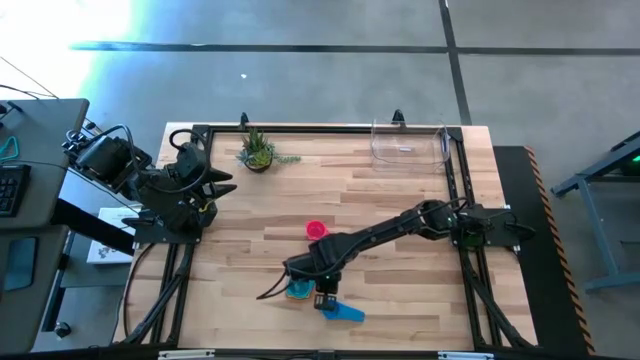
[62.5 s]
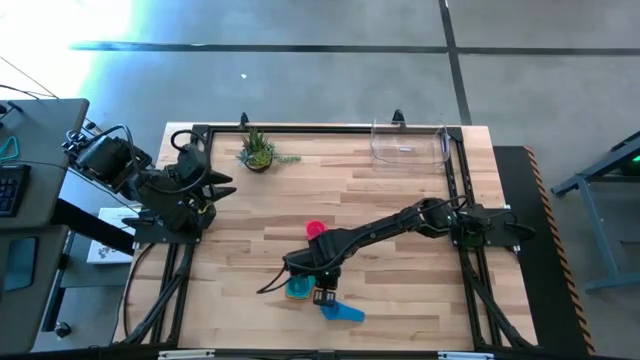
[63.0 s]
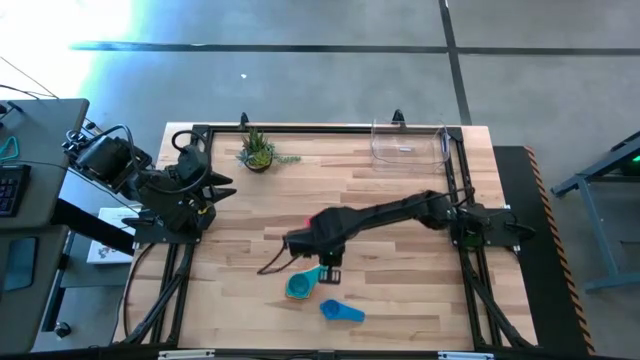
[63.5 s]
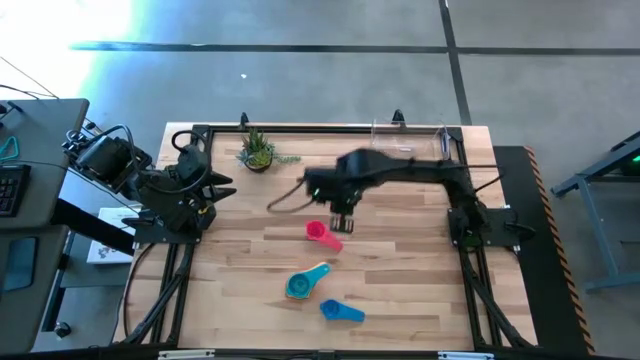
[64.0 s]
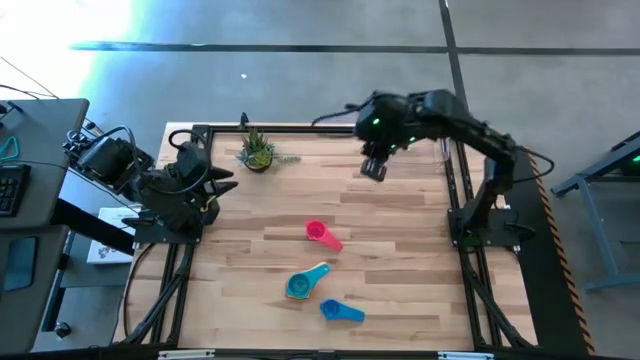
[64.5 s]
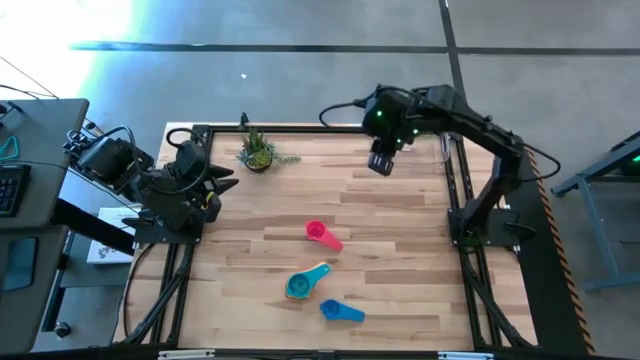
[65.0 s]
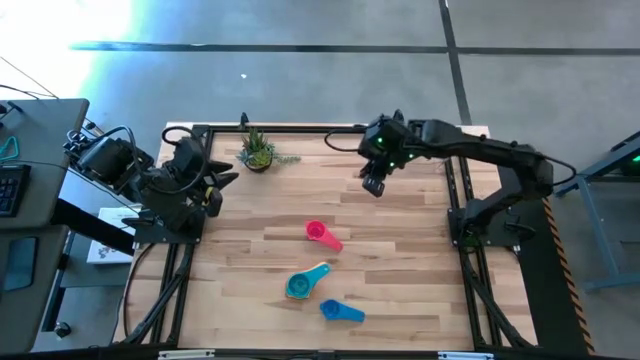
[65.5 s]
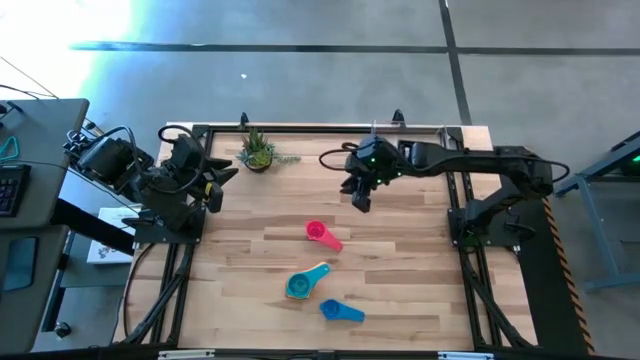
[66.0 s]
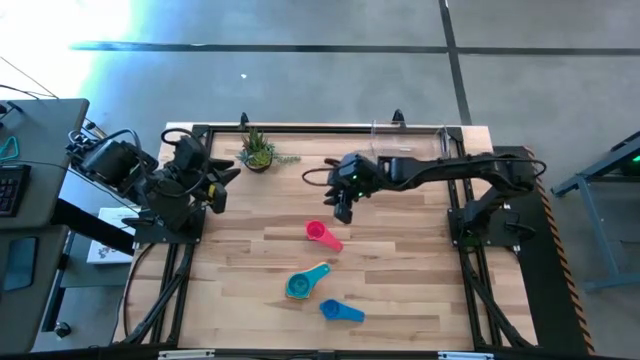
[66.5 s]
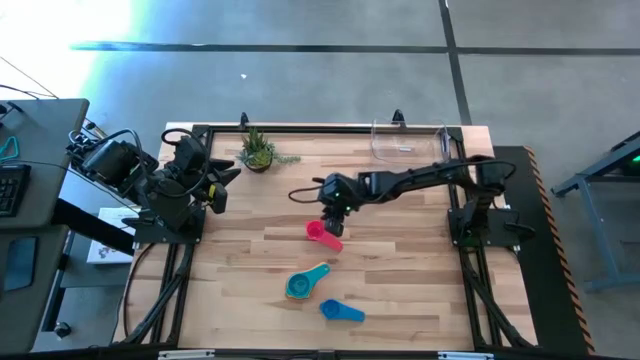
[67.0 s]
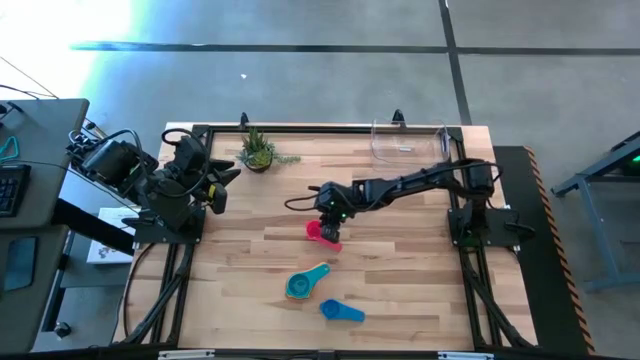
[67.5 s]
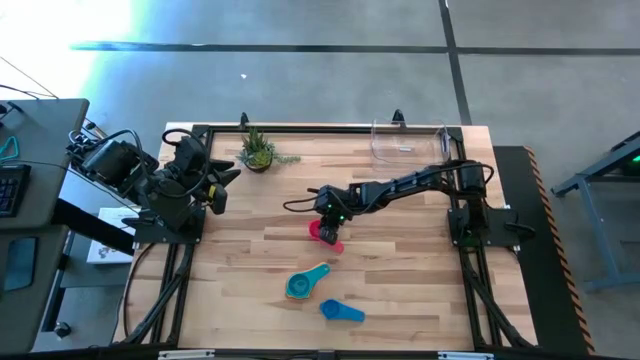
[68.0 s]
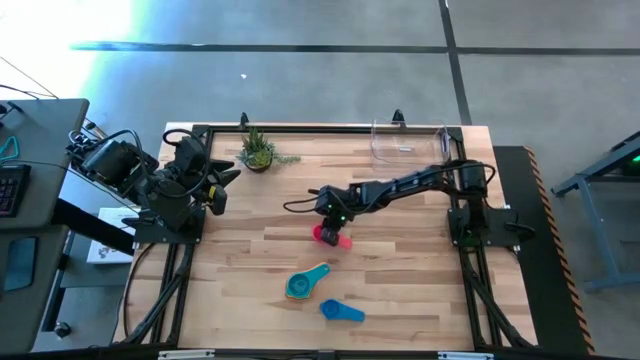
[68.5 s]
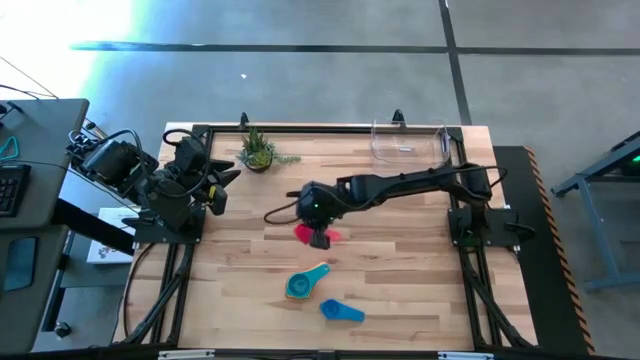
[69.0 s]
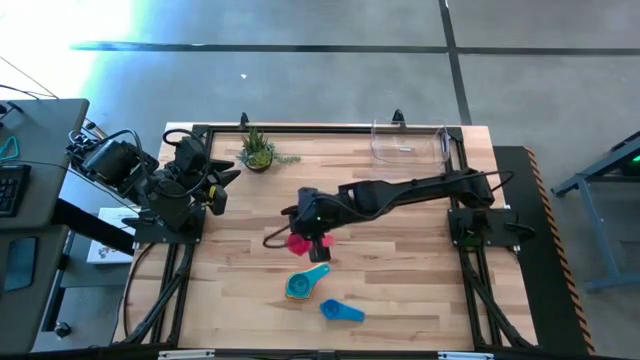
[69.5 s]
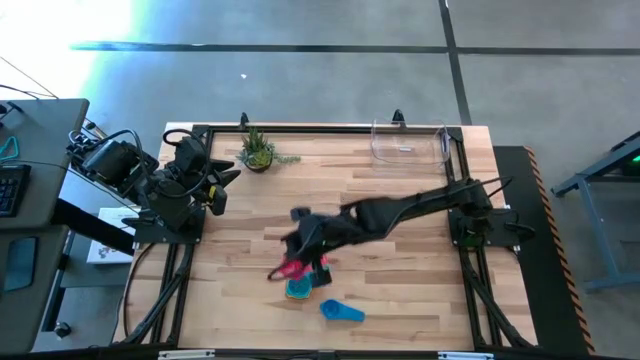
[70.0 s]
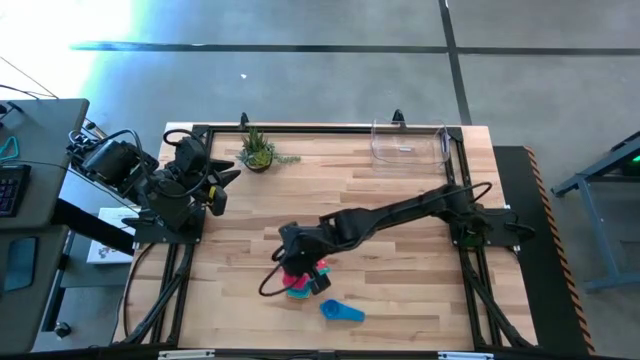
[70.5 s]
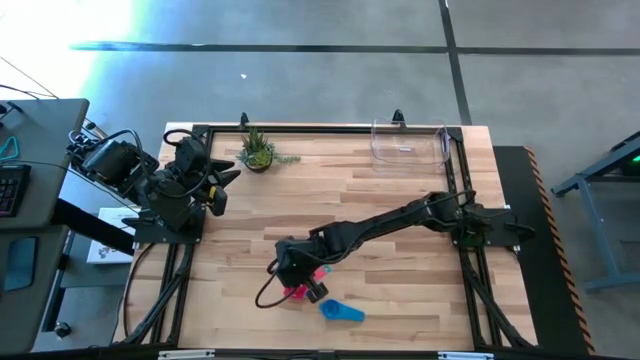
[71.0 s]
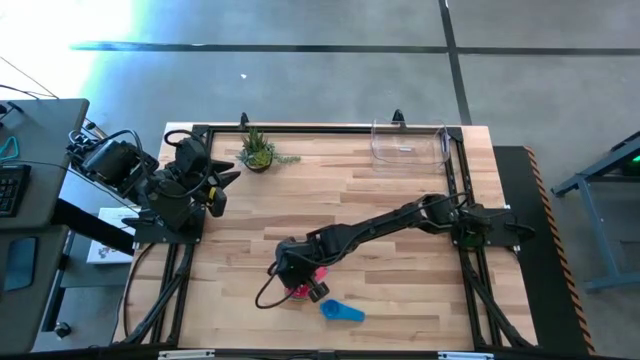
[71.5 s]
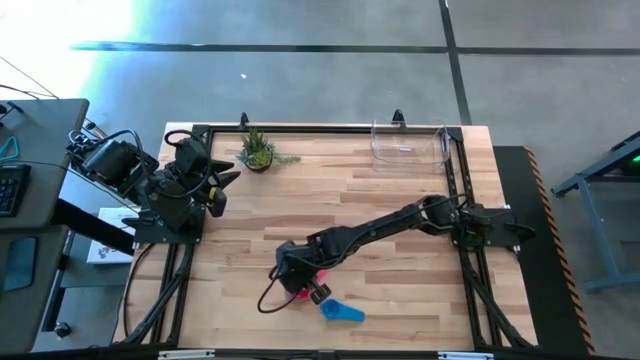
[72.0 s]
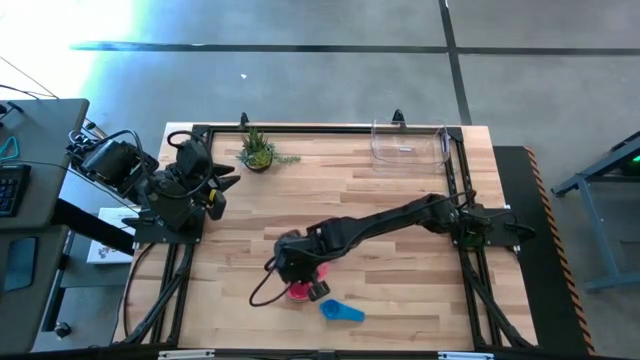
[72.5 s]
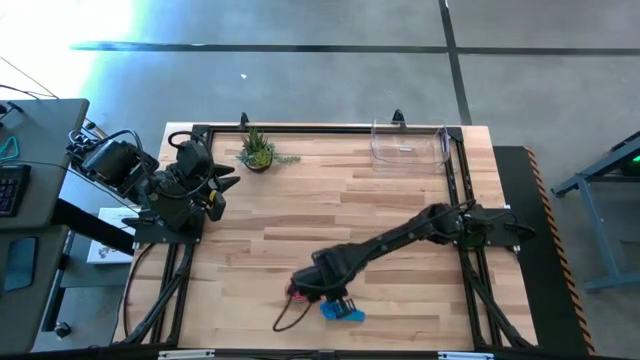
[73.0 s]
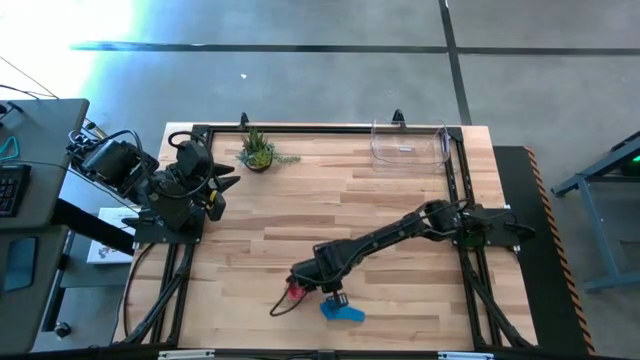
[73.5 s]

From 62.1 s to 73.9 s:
Task: Nest measuring cups in basket
Stack the red measuring cup on top of the light blue measuring cup

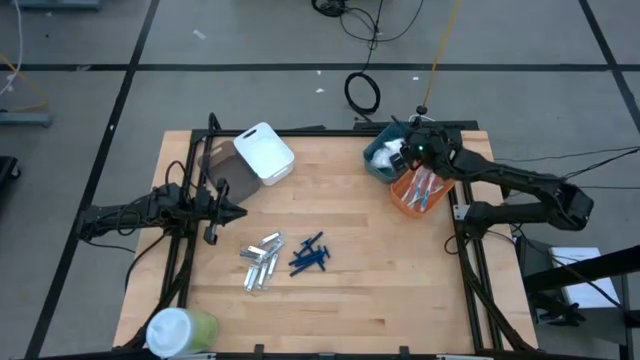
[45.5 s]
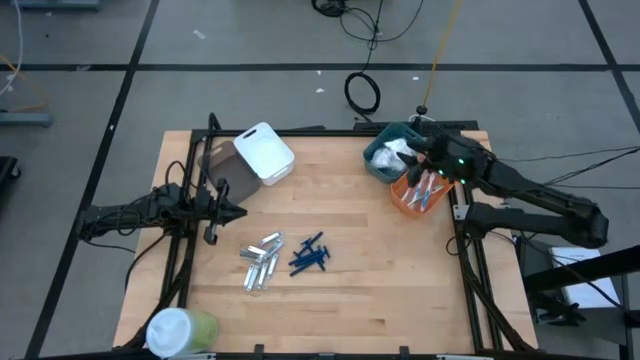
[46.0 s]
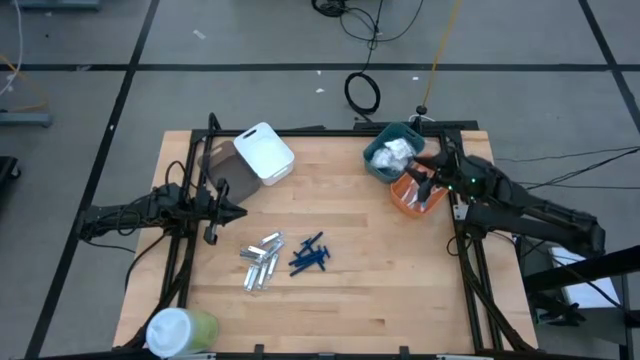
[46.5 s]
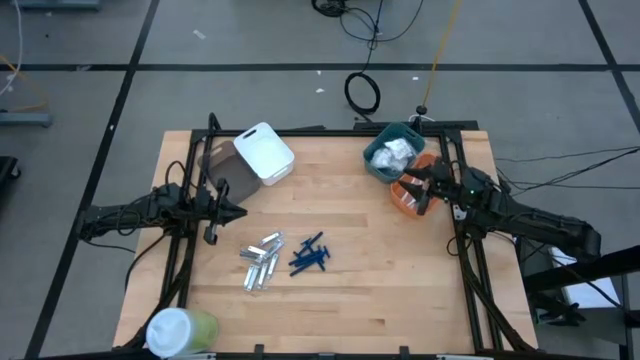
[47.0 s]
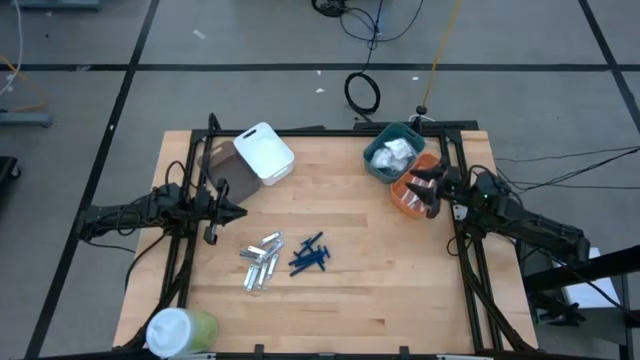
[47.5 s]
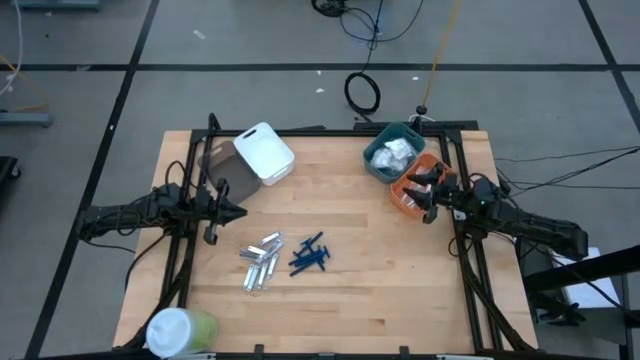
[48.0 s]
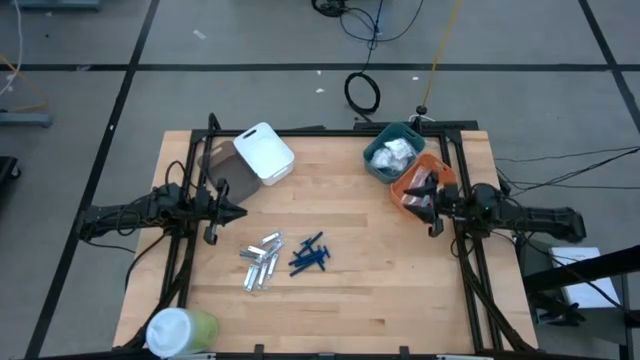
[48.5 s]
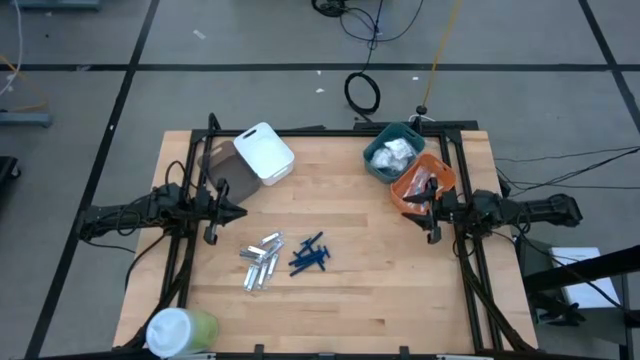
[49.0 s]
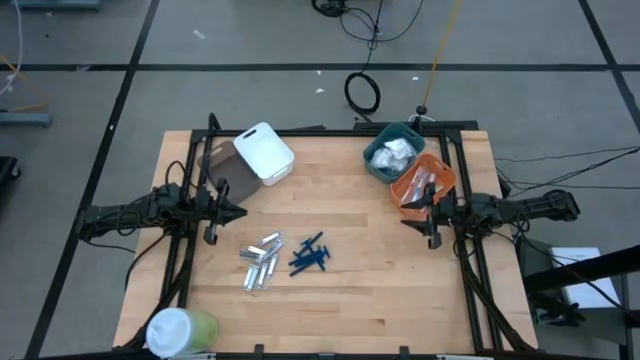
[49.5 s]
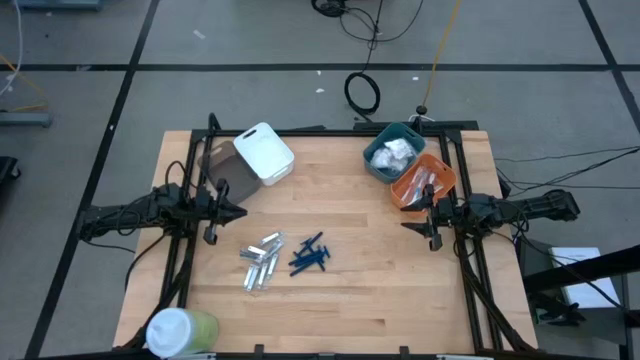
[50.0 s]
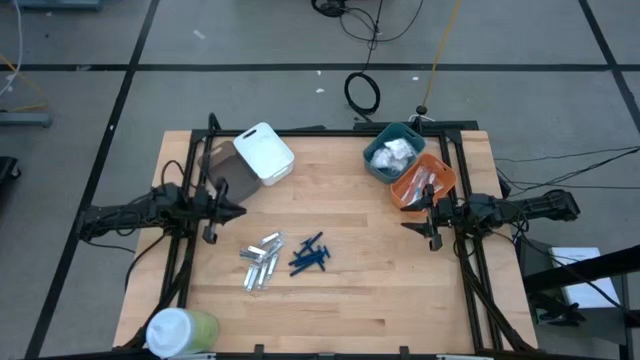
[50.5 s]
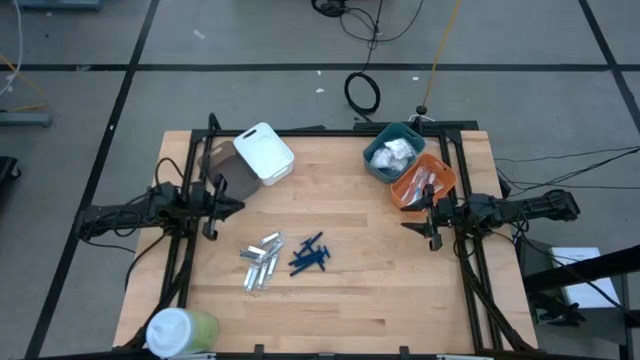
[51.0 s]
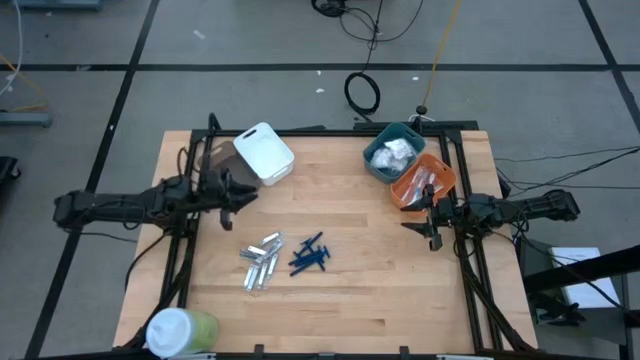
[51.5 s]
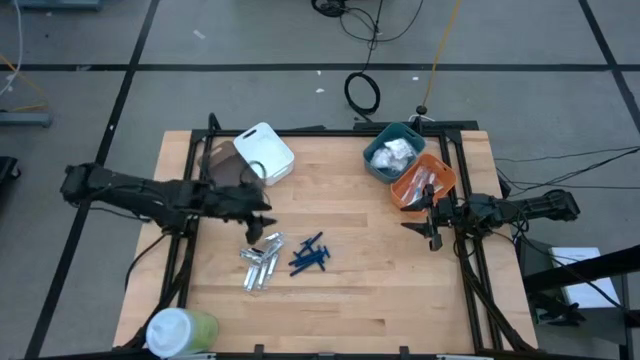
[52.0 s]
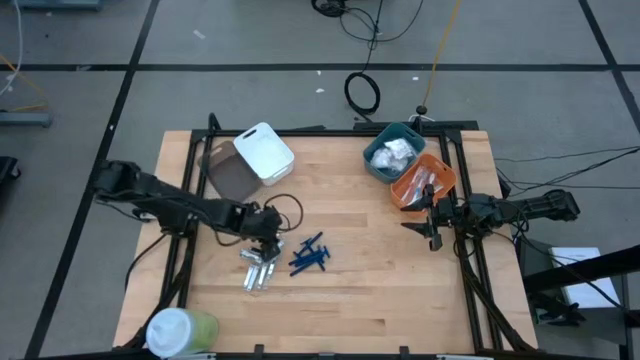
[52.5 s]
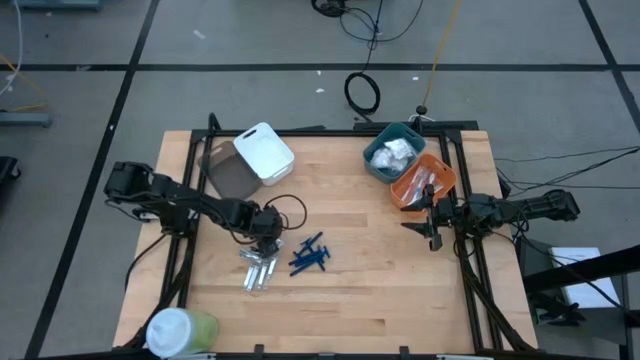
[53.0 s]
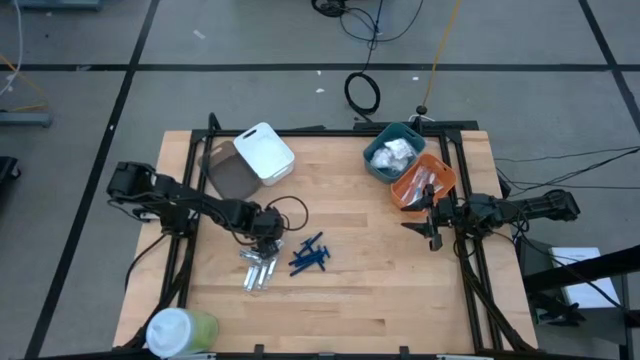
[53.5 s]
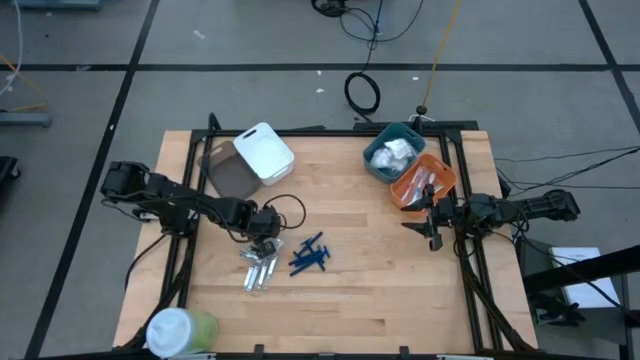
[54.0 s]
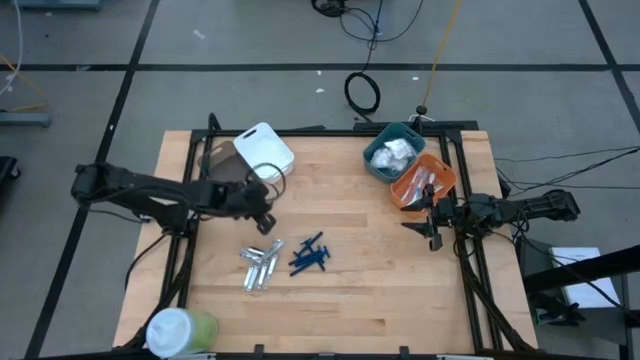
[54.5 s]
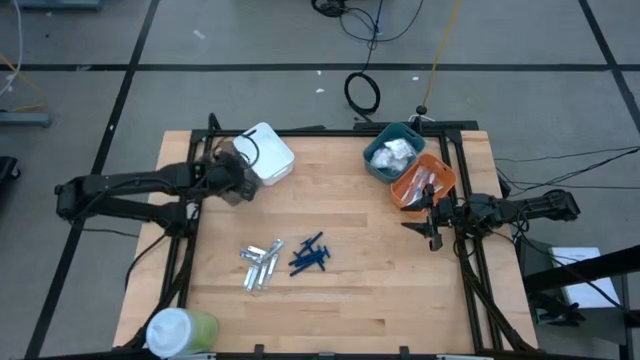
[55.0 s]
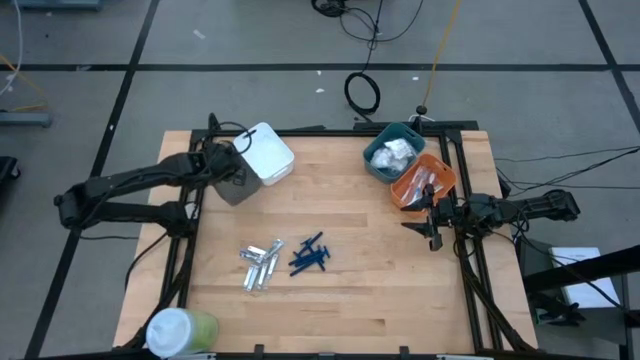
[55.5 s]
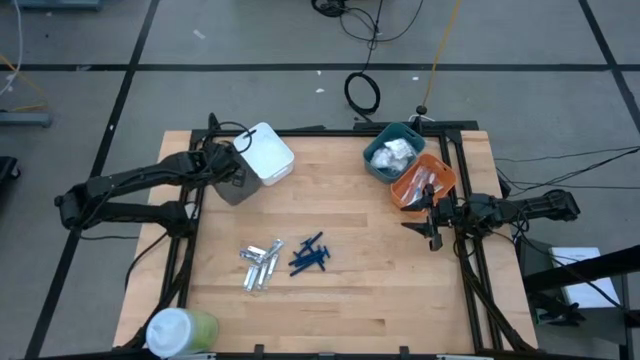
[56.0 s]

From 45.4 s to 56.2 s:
Task: Pick & Place Travel size toiletries
Put the silver nail cutter into the black bin
